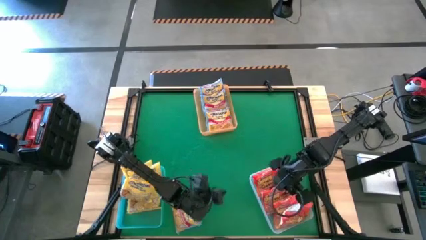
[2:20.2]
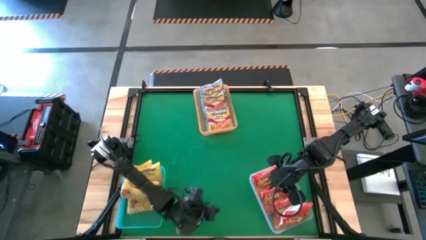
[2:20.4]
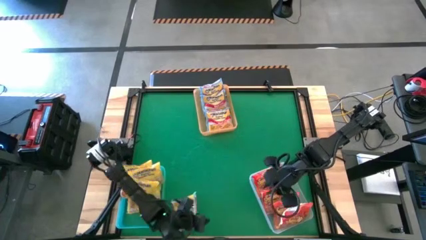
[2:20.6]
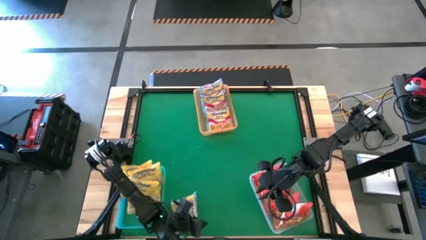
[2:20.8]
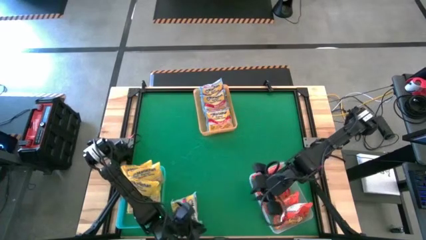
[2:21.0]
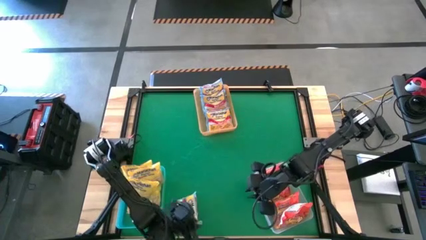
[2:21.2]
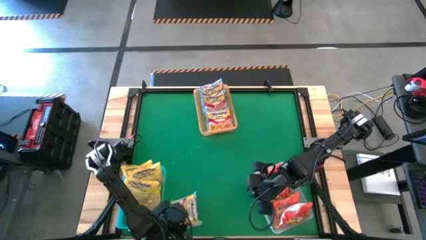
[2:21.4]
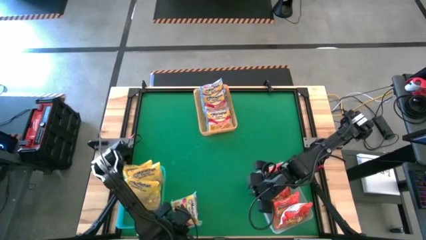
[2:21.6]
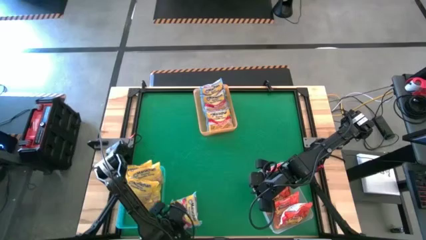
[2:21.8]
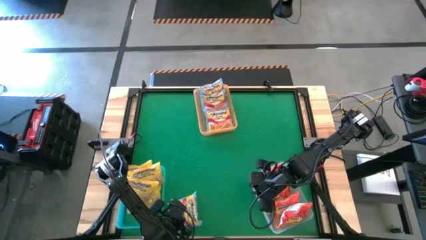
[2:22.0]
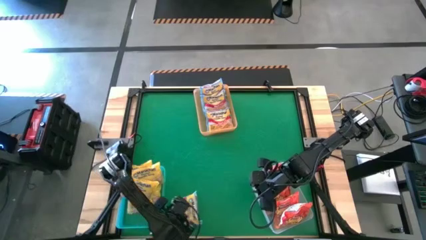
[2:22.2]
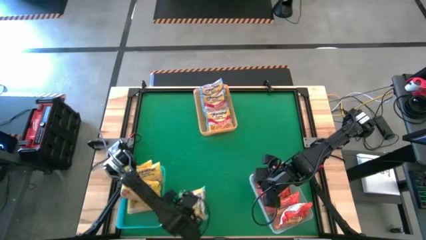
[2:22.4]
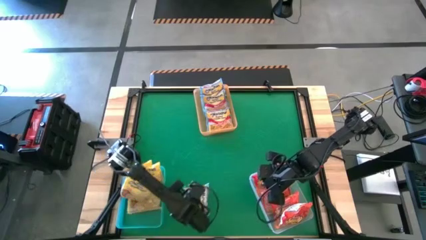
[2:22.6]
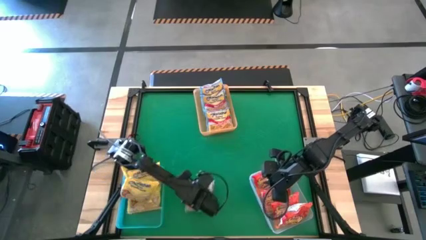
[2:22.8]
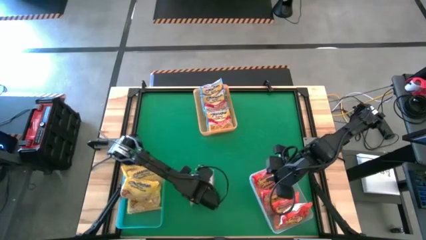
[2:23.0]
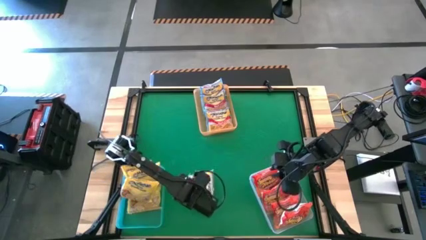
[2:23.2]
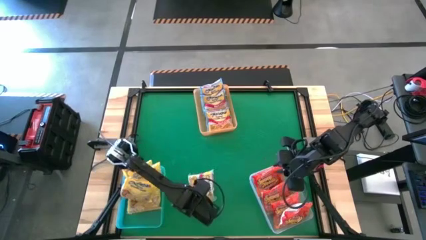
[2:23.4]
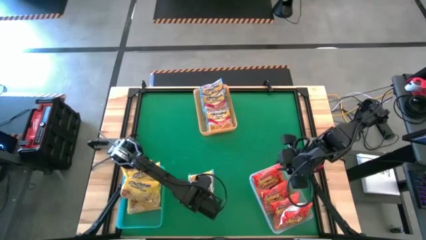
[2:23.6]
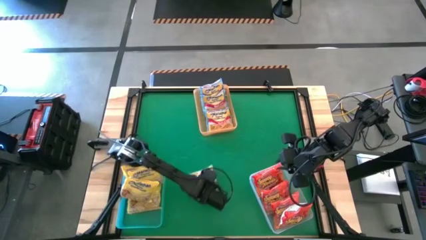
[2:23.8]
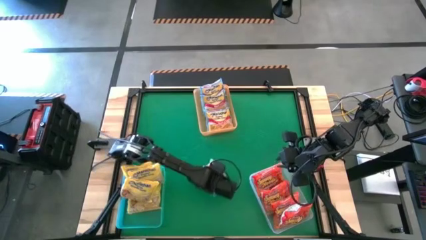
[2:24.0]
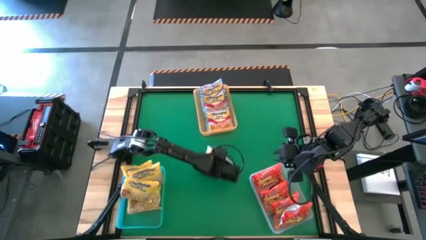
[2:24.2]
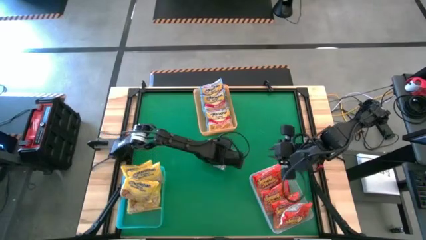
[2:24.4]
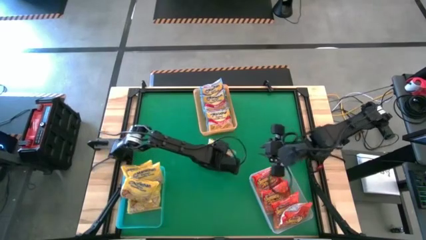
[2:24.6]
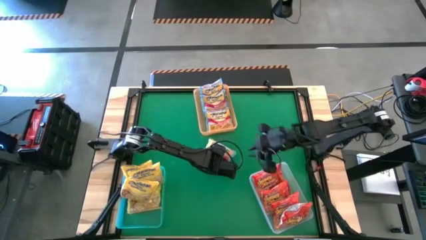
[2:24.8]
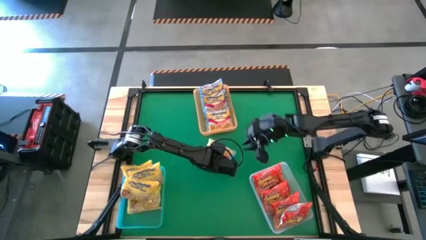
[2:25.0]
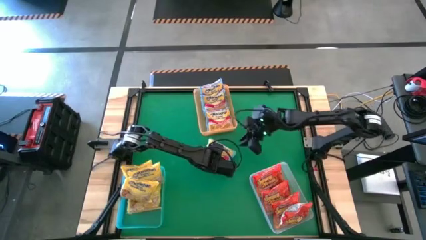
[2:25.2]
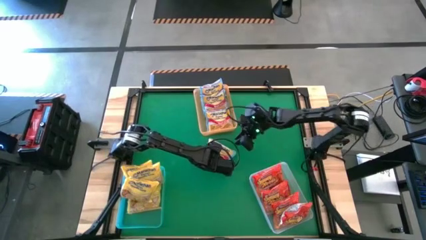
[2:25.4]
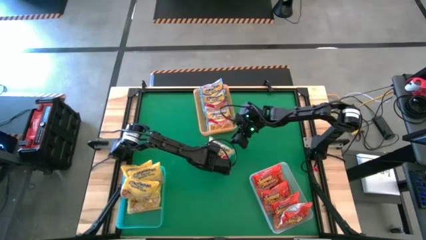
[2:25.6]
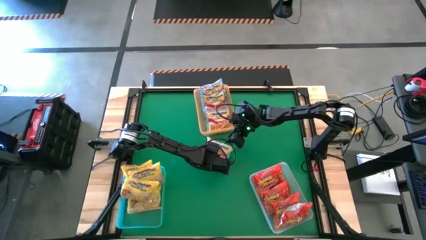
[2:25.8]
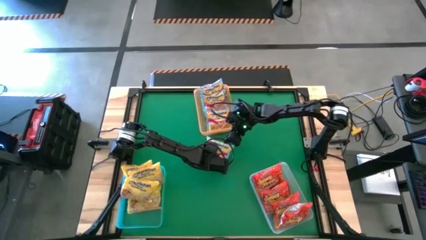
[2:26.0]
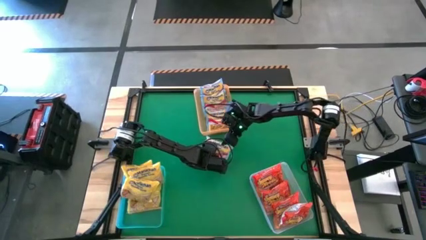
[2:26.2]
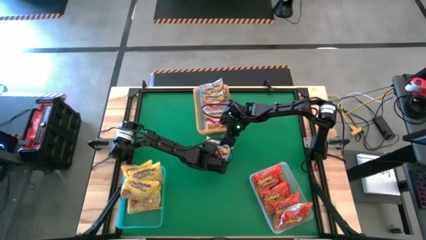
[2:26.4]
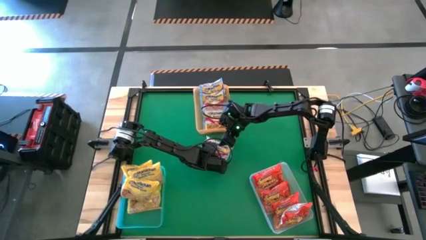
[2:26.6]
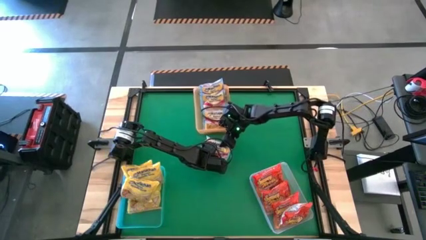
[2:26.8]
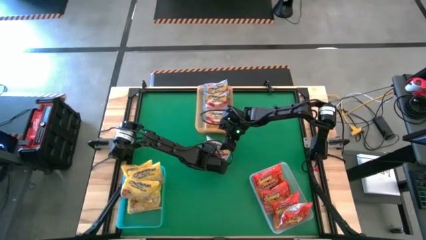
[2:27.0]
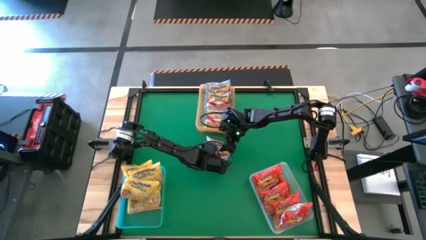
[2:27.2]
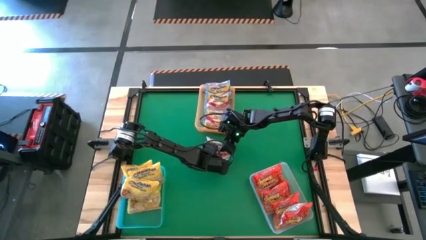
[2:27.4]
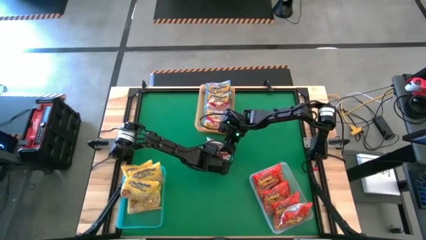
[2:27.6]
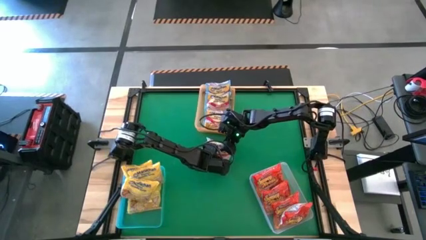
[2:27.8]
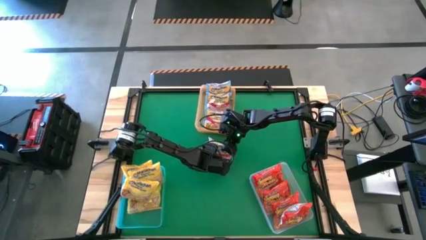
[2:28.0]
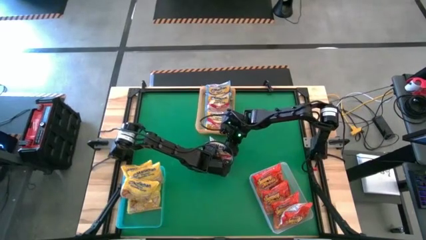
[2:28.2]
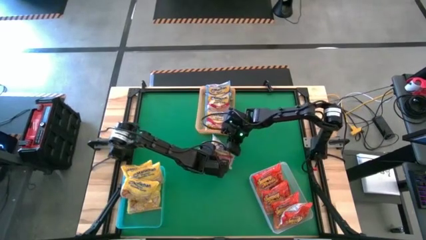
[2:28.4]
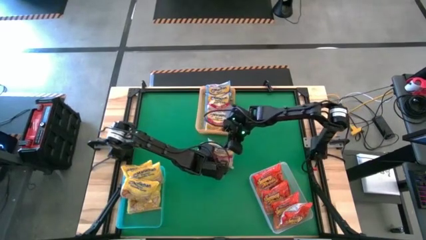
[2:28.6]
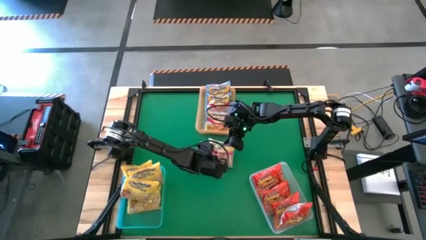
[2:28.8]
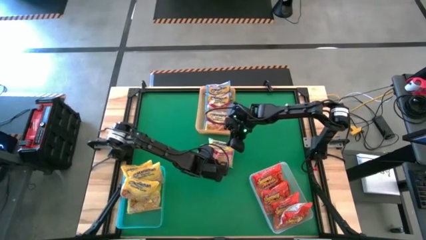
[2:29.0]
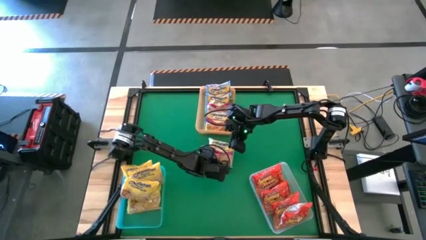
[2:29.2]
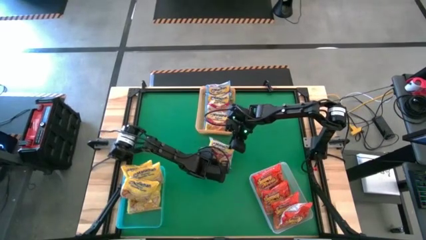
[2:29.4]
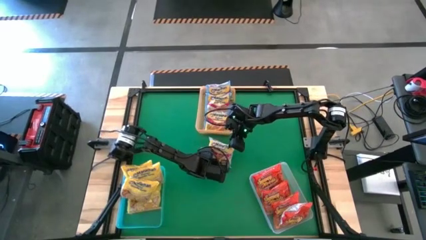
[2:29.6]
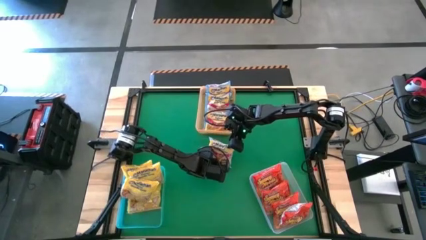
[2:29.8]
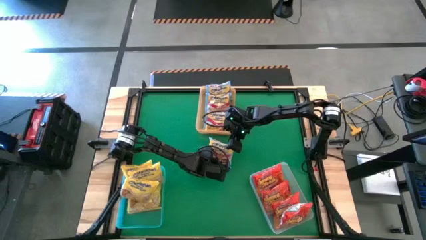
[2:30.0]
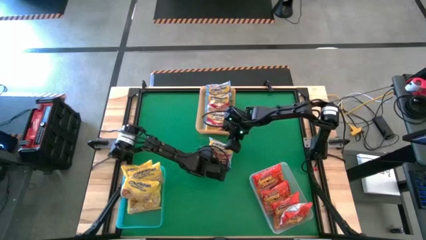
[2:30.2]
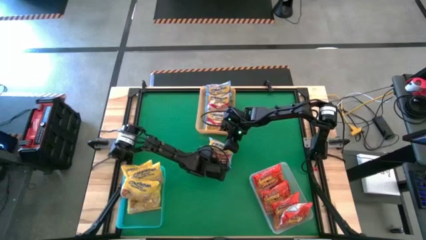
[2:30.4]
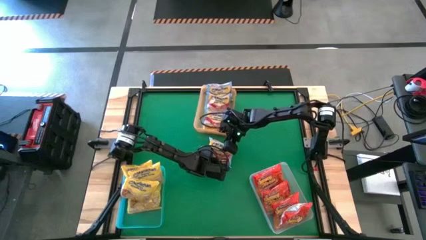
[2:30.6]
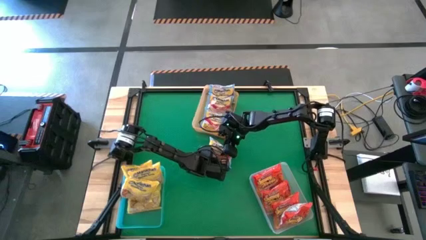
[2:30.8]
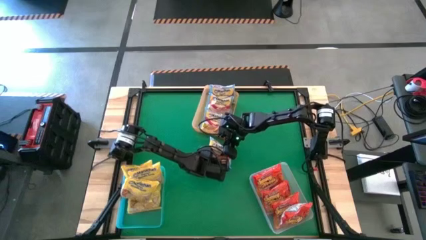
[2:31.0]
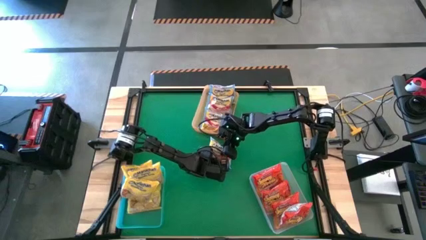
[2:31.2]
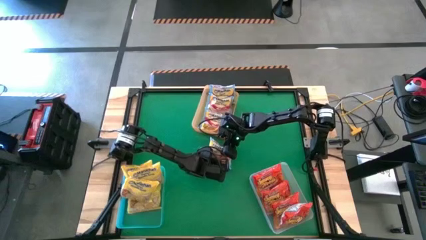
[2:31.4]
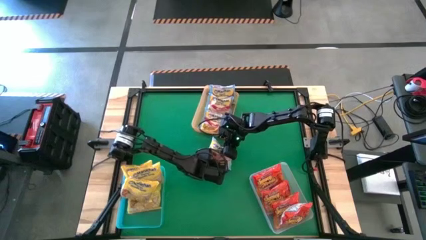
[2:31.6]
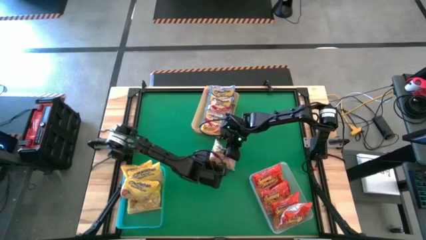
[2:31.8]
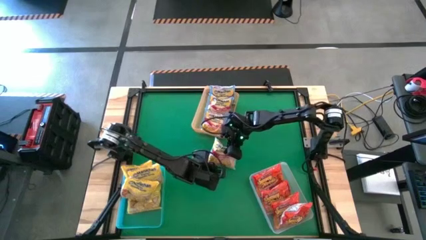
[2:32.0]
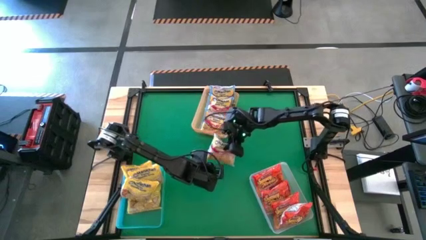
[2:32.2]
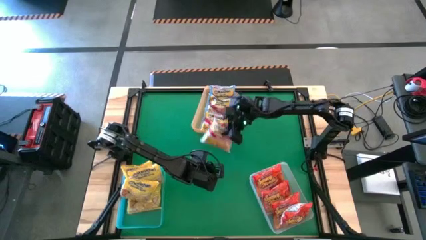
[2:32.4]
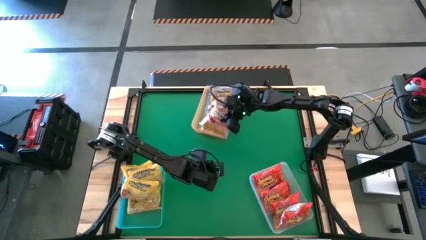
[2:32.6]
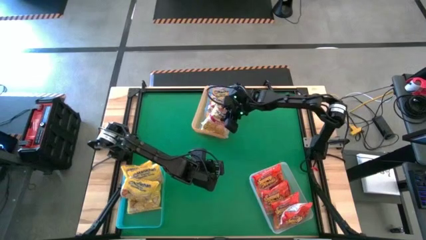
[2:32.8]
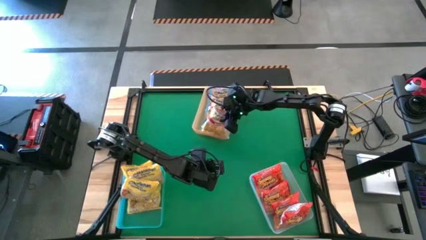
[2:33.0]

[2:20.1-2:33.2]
Task: Sort Maruchan noodles
Put the blue noodle pack into the yellow bin

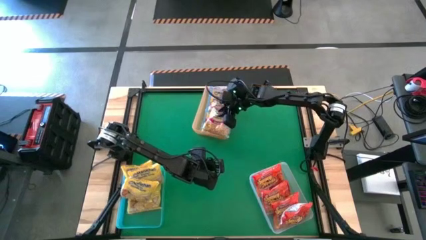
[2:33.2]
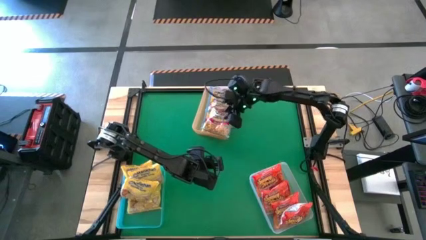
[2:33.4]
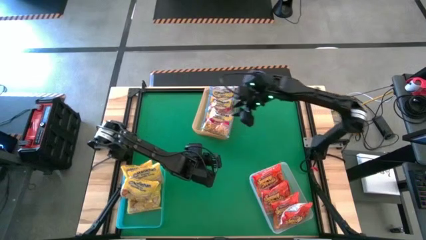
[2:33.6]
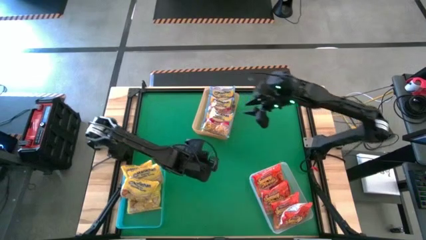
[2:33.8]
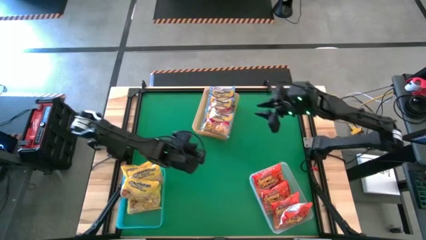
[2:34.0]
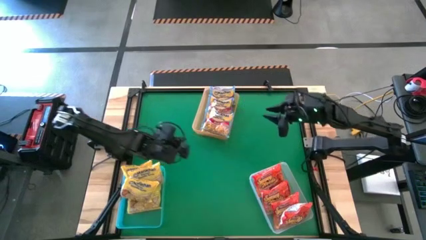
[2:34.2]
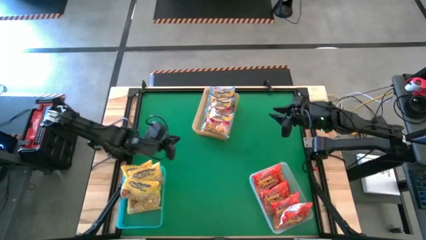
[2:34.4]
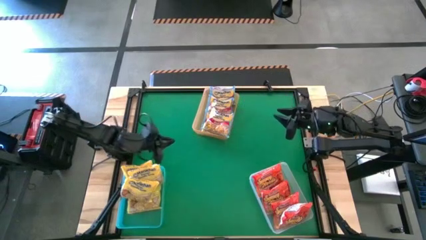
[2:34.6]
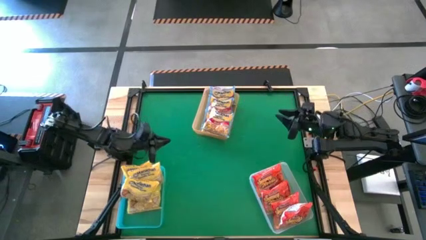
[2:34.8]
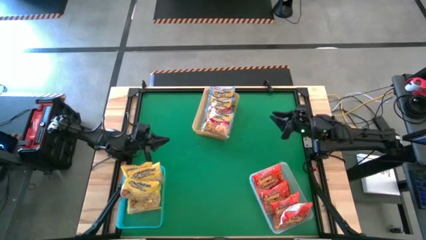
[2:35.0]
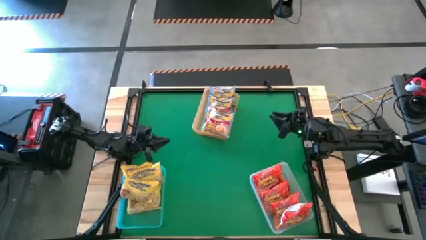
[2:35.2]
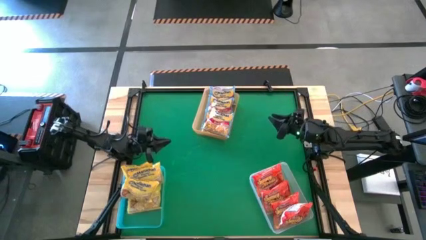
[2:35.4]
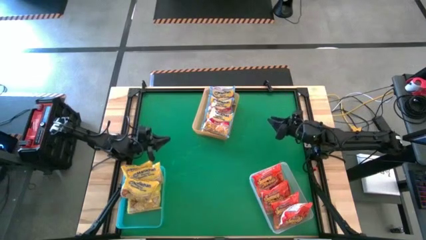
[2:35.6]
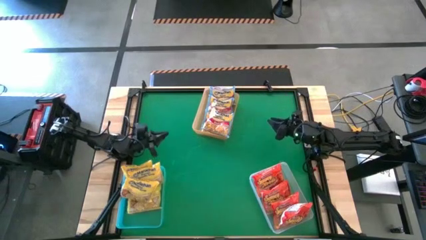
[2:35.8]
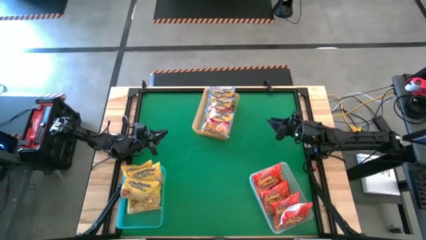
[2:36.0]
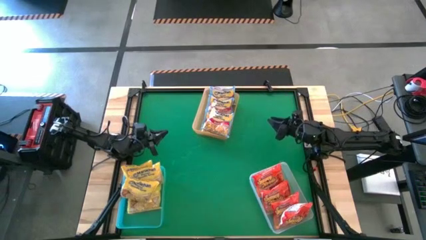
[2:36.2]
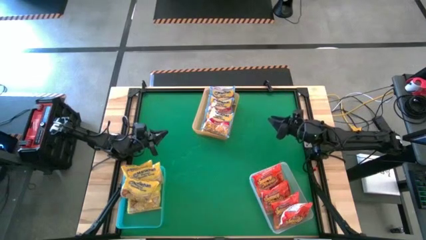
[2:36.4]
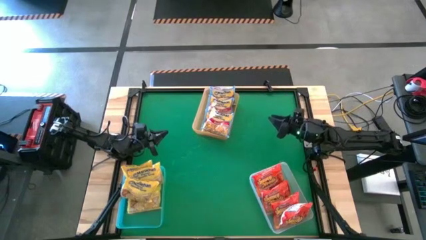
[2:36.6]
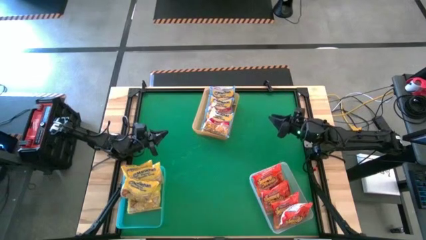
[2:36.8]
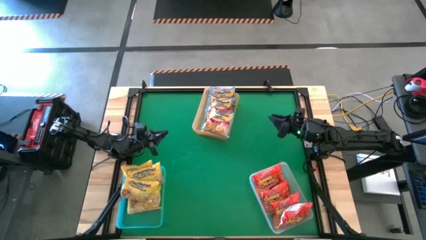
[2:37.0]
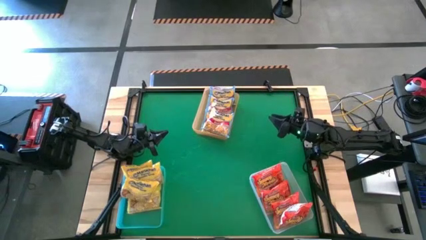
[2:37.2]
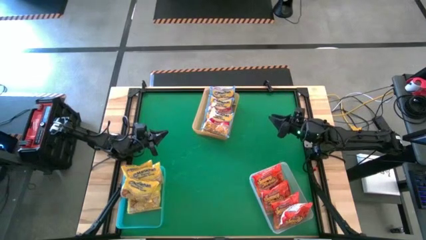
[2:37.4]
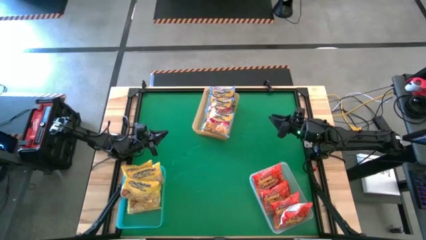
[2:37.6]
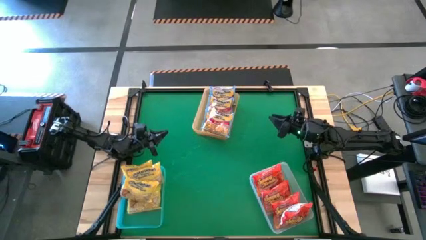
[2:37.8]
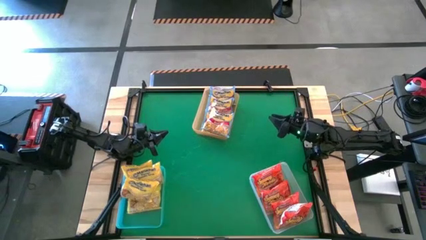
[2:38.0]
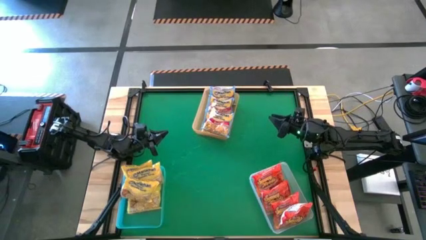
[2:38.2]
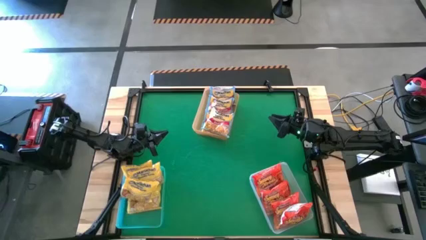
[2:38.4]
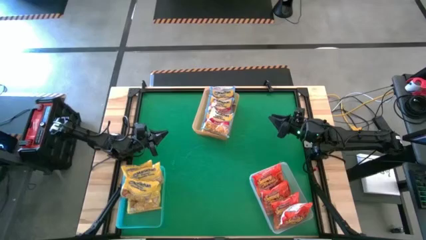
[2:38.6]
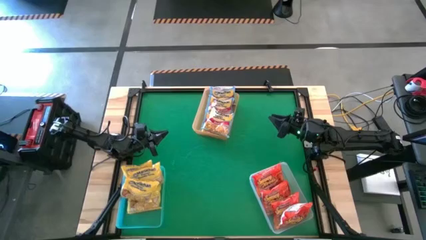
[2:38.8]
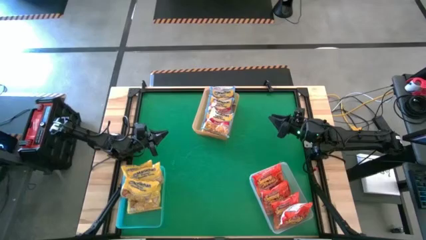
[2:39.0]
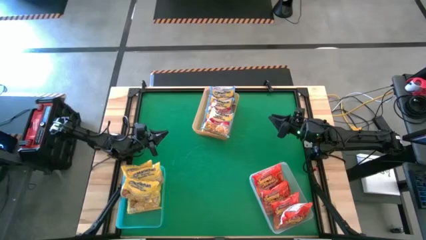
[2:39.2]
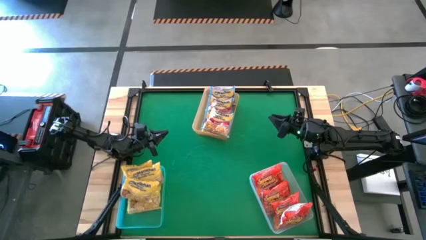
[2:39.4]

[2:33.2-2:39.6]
Return to Home Position
